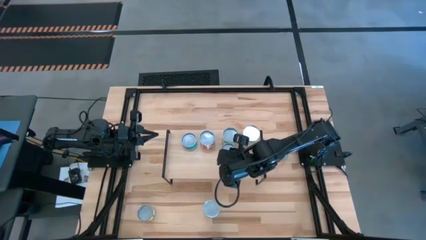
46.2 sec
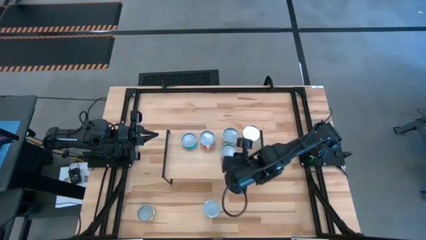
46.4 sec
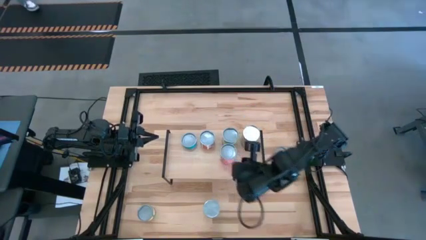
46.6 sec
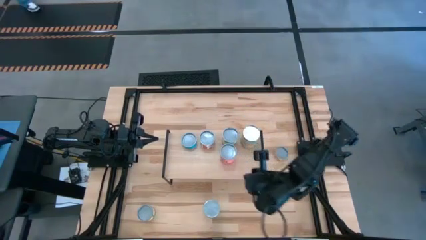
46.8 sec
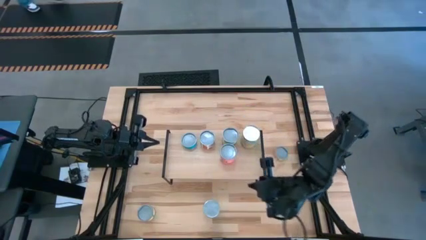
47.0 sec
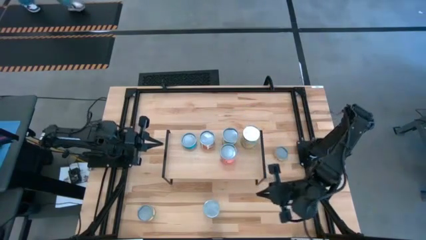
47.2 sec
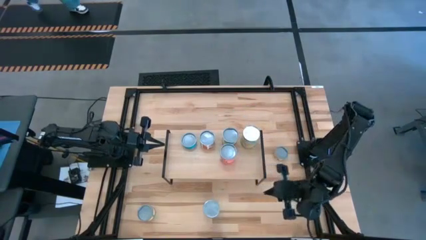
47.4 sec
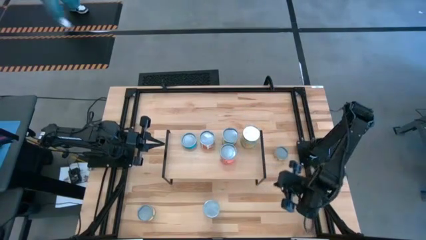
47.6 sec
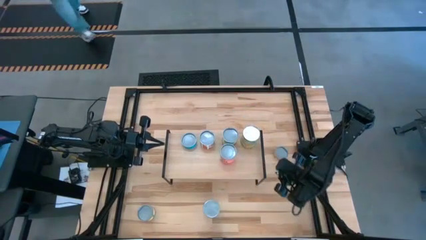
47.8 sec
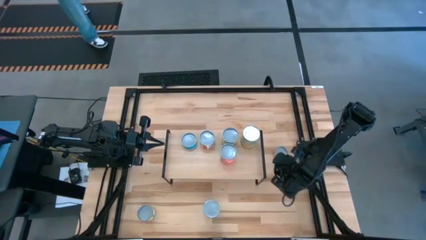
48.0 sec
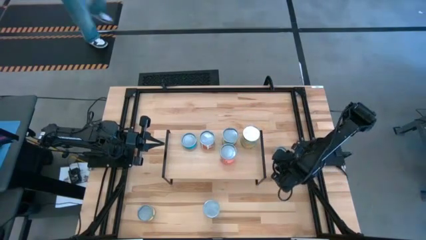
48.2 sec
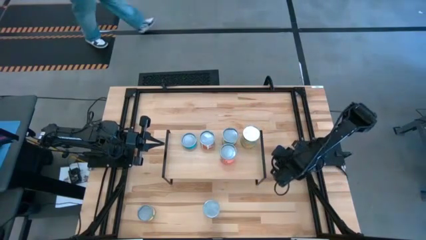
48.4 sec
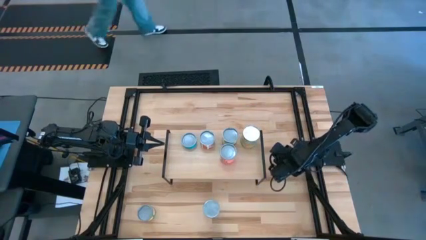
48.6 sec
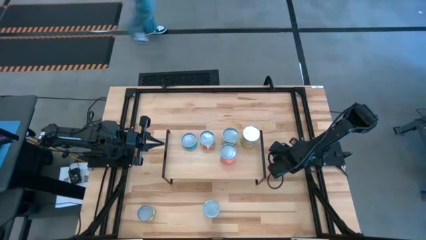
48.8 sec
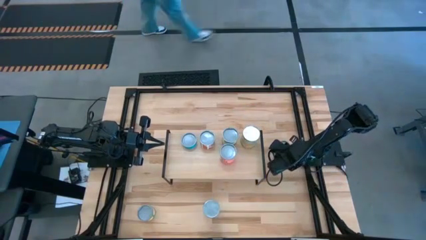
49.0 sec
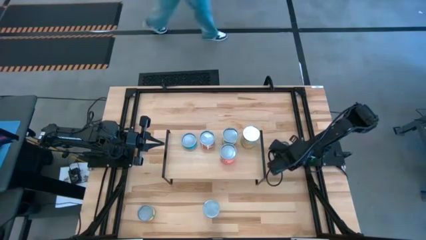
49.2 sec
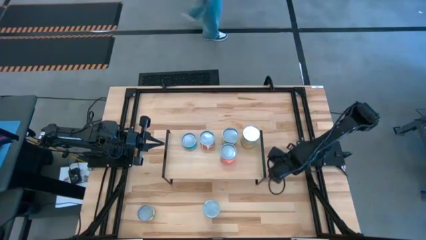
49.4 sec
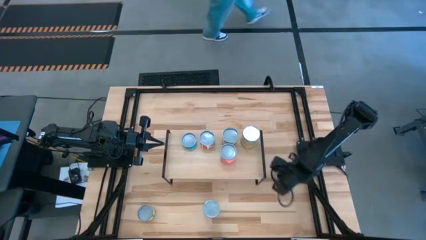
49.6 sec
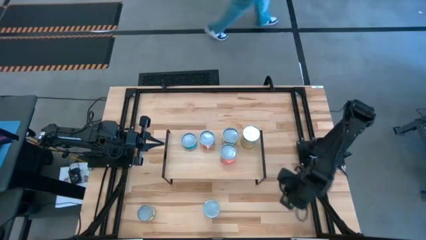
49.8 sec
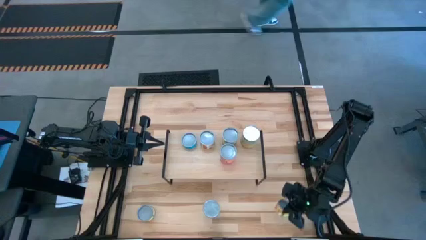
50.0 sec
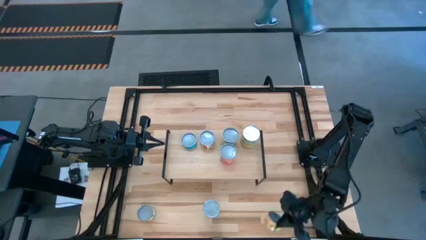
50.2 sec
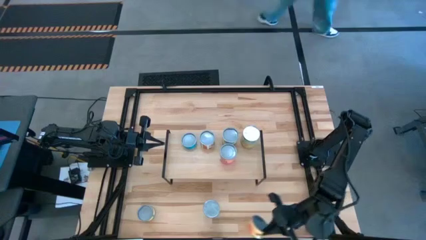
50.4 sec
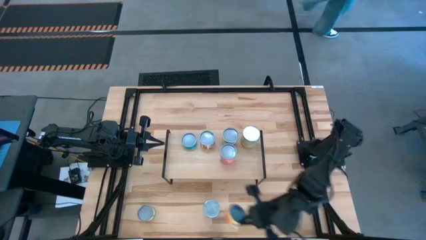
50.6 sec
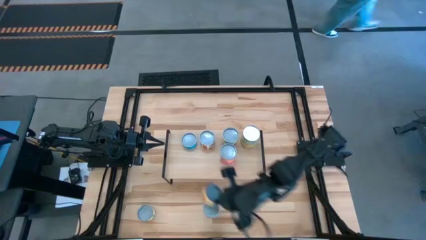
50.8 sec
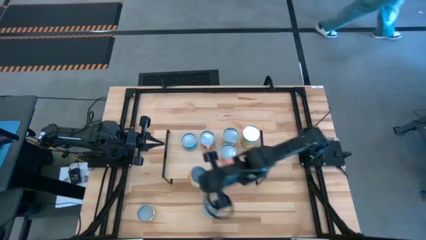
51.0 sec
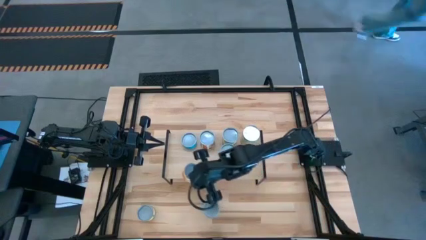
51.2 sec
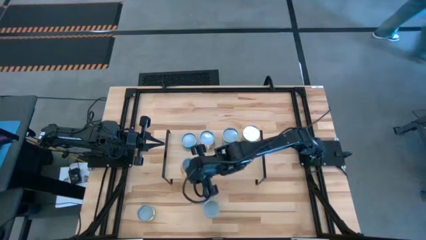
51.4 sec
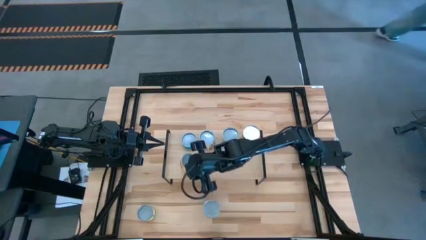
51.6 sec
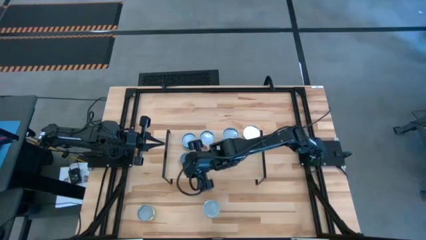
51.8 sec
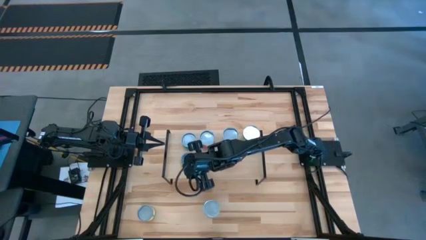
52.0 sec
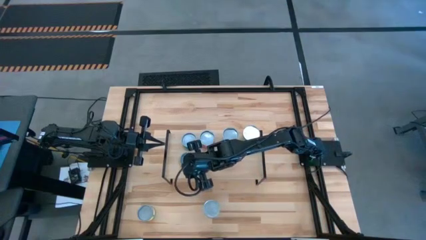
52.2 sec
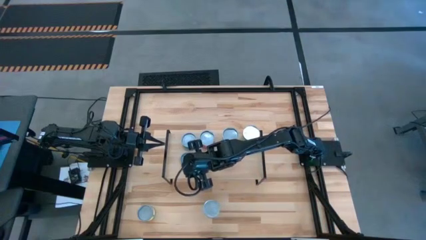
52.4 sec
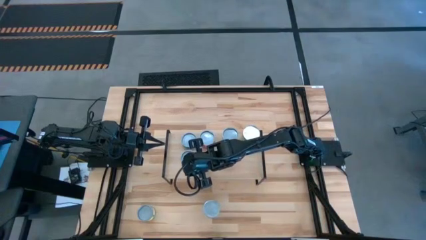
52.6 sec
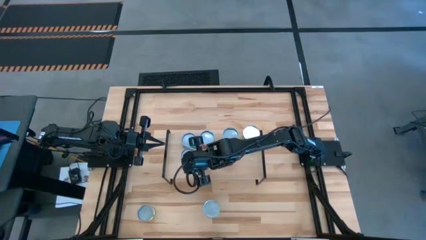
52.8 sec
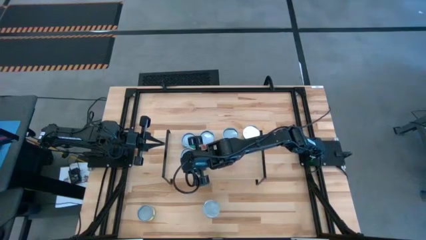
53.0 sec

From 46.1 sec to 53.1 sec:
Task: Pick and place cans onto a shelf
Put the canned mushrooms on the shelf

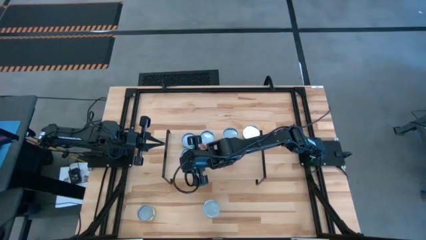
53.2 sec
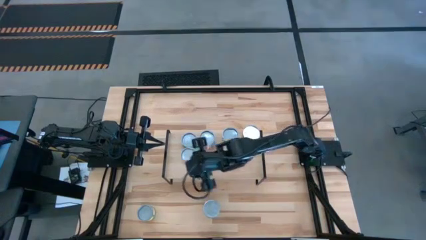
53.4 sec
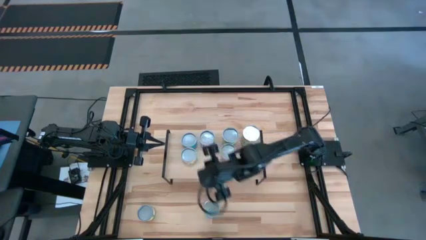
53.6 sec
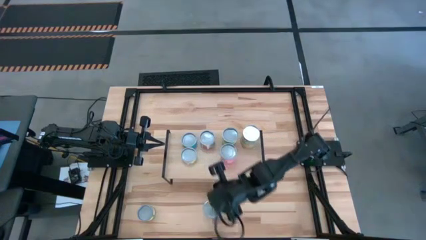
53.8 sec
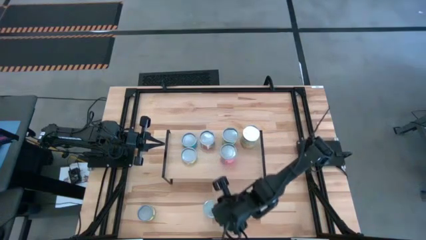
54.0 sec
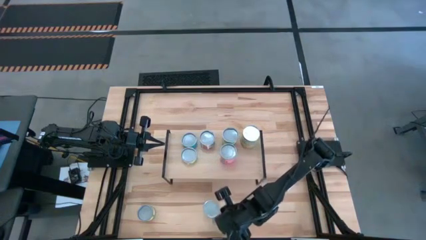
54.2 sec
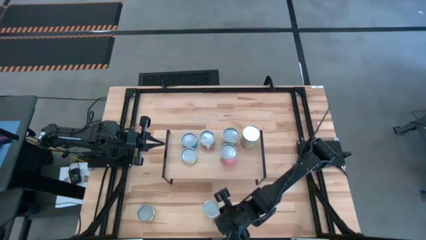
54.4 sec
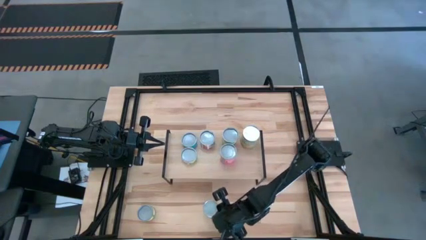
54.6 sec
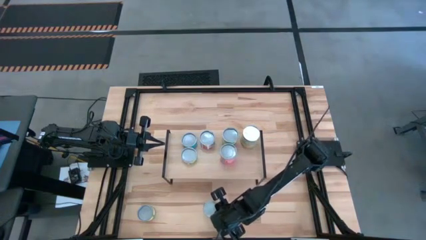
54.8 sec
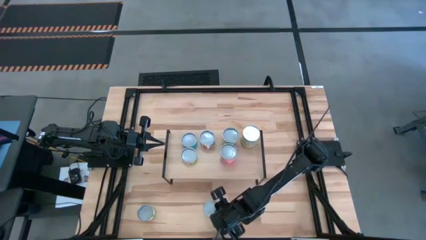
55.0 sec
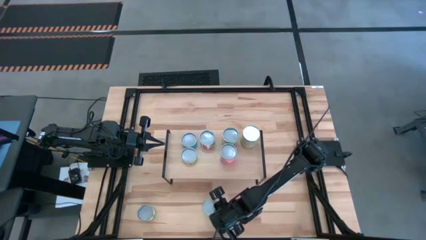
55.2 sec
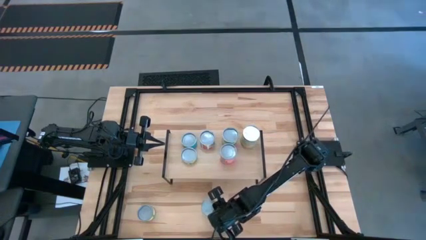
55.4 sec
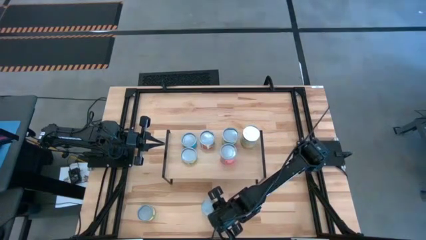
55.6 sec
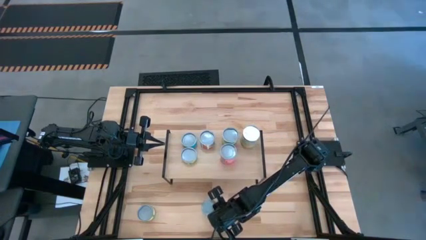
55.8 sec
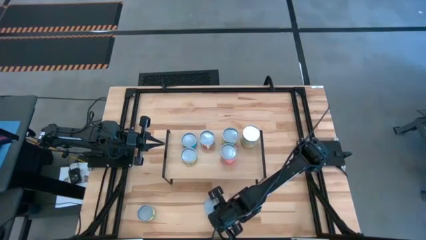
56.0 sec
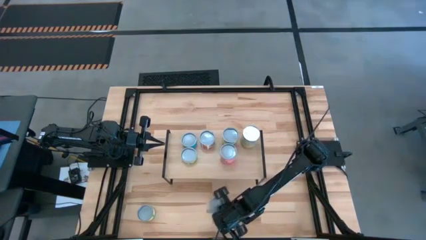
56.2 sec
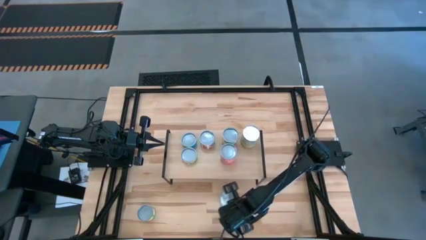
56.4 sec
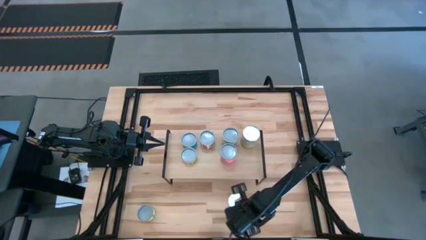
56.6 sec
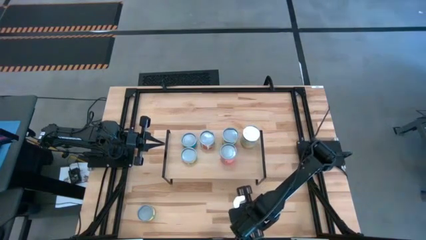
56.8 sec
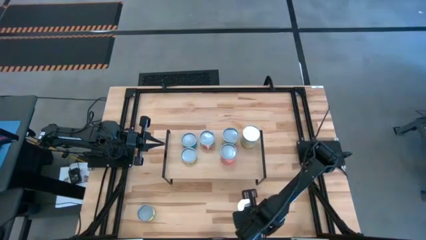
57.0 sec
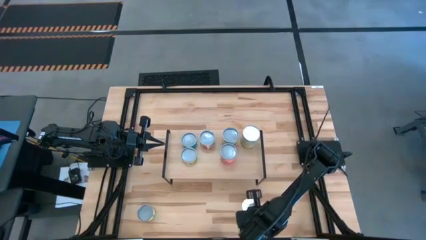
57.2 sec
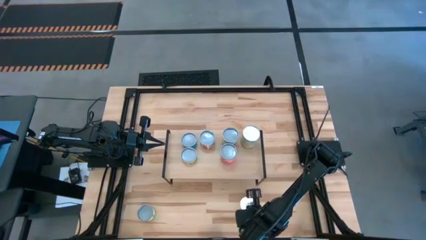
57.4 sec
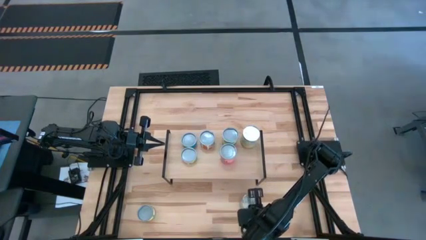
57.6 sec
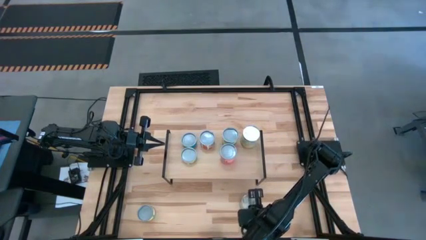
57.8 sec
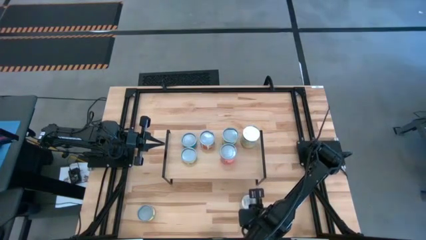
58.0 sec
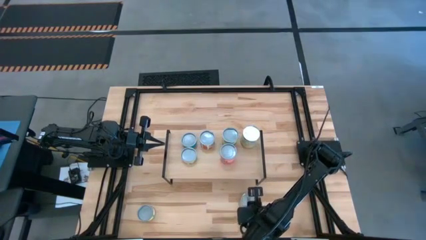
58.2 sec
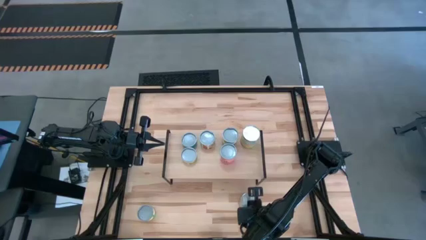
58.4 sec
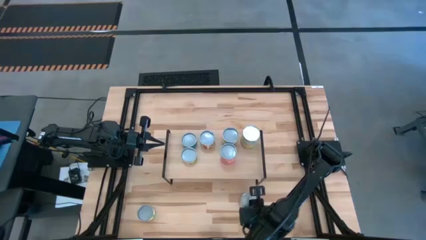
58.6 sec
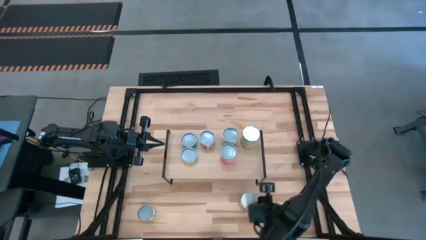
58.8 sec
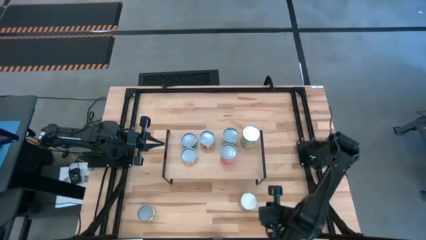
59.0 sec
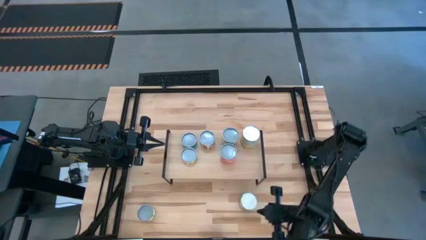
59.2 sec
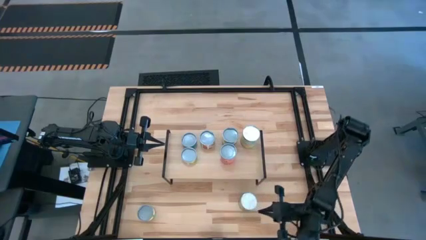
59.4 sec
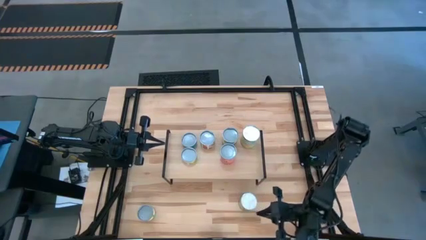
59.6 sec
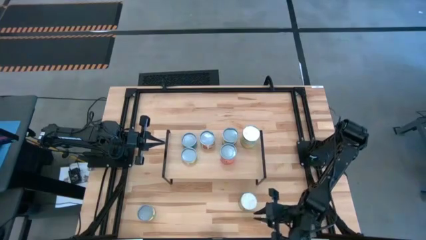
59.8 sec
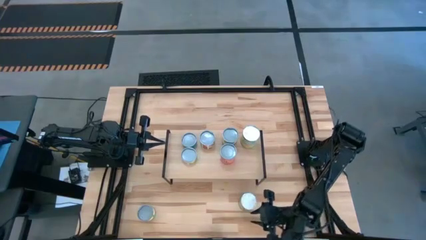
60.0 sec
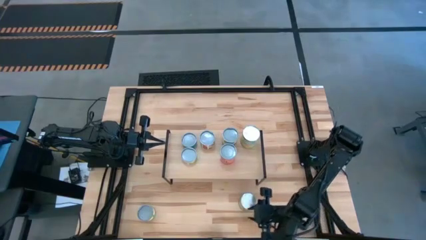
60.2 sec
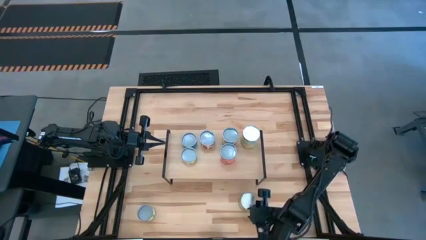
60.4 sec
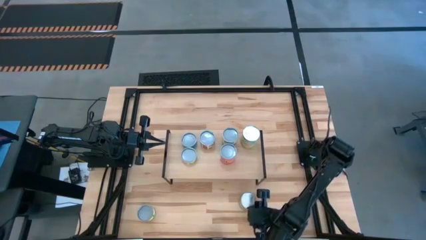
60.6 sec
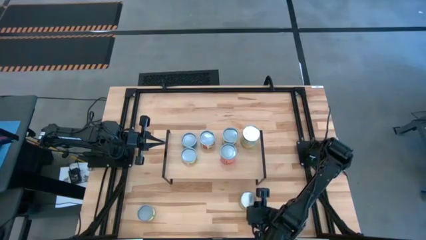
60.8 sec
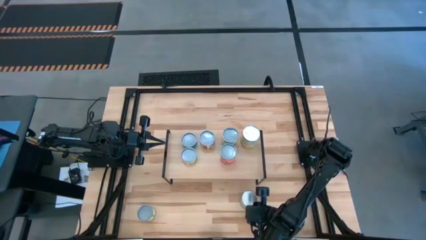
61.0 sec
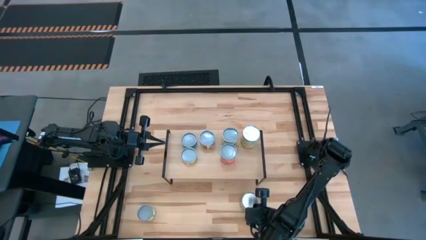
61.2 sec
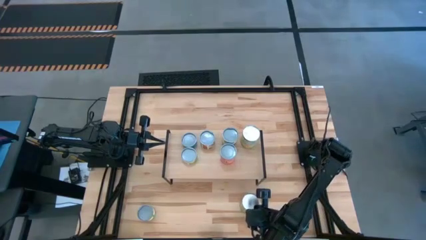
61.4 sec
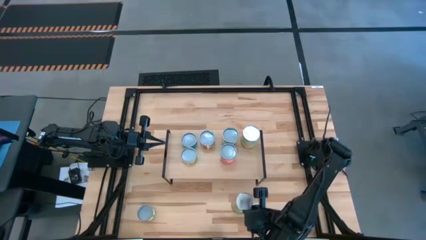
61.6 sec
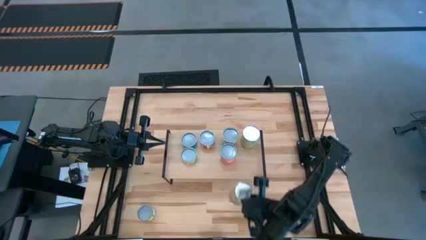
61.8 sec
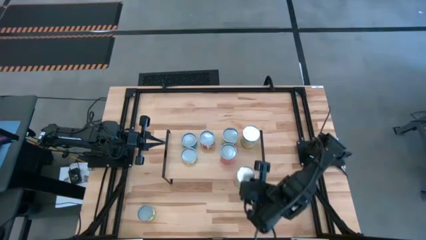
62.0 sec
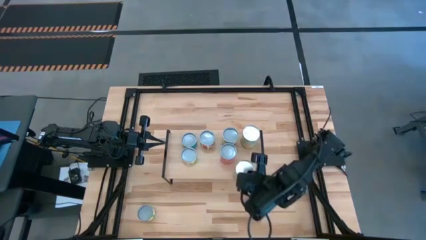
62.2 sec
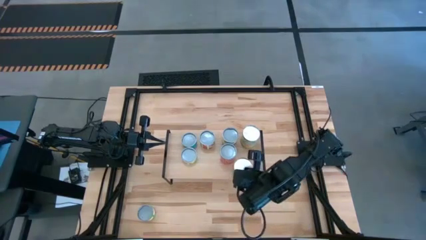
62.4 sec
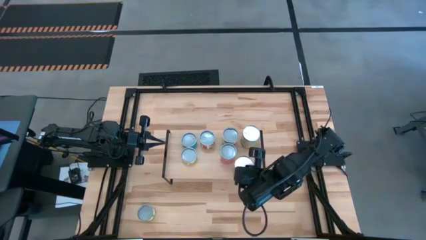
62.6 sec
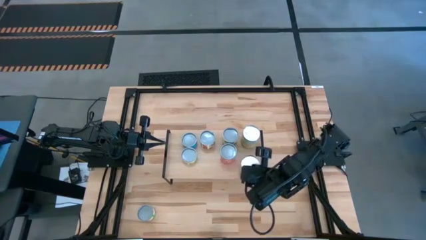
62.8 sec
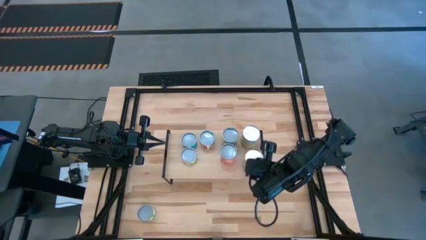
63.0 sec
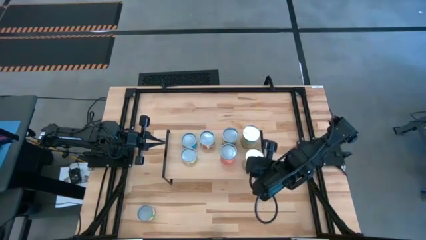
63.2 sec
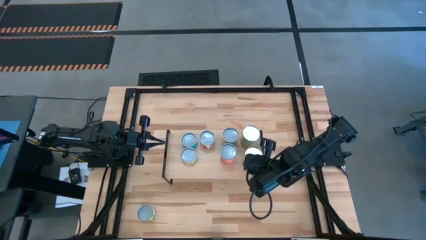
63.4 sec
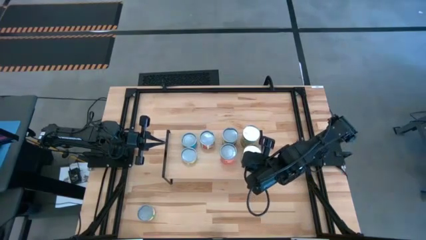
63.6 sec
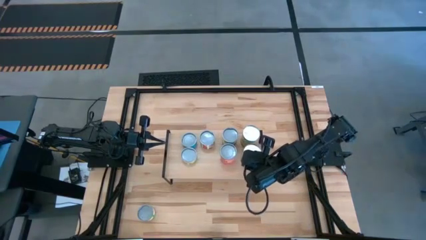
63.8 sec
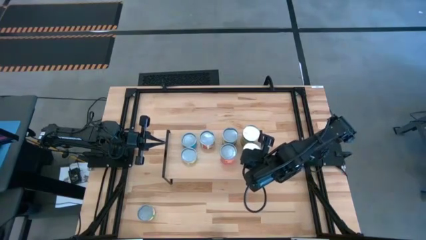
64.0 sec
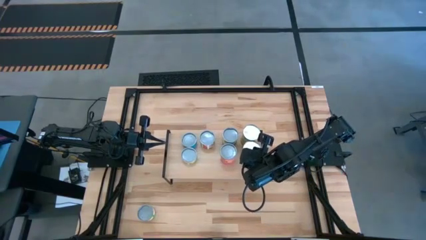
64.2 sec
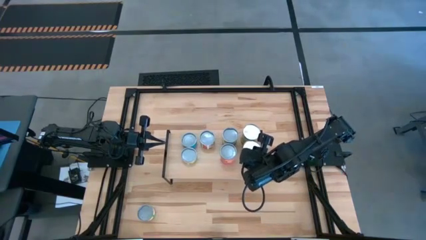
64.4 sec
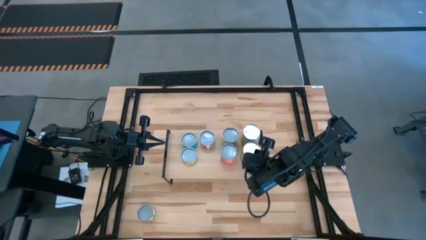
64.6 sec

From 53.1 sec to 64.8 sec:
Put the canned oranges on the shelf
